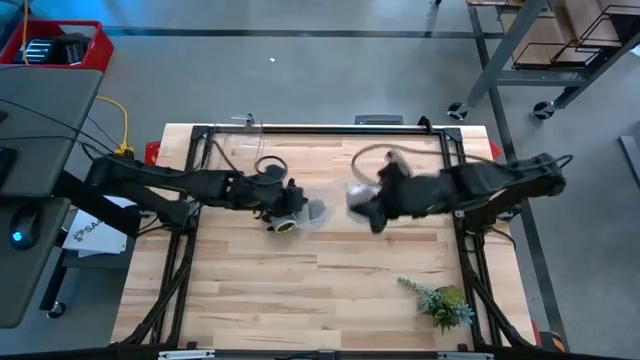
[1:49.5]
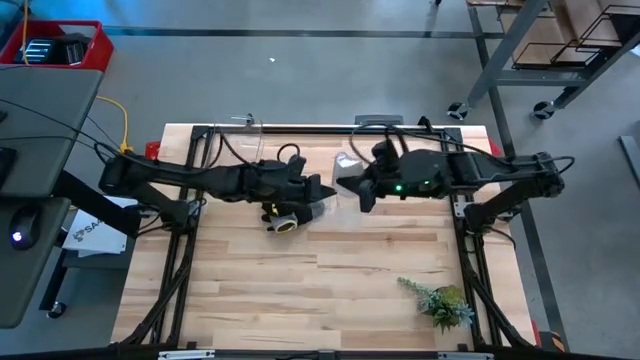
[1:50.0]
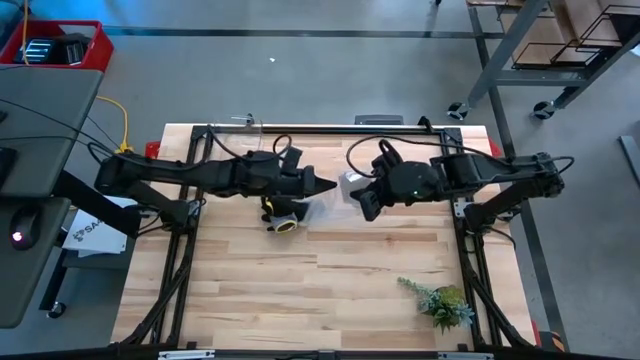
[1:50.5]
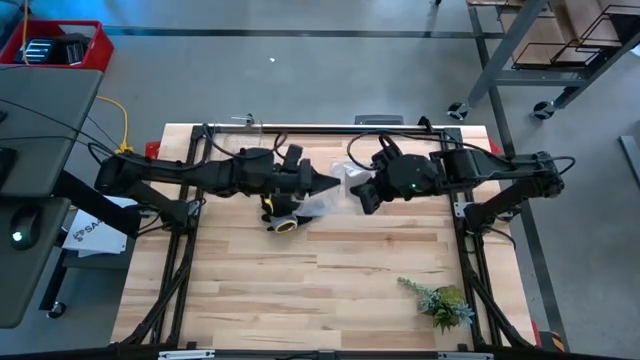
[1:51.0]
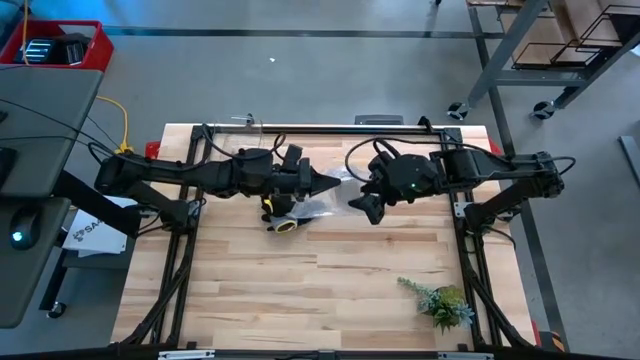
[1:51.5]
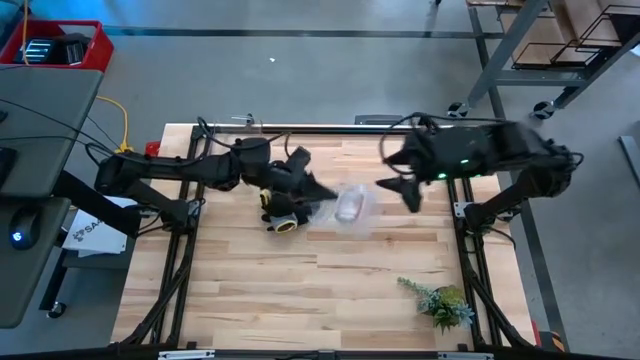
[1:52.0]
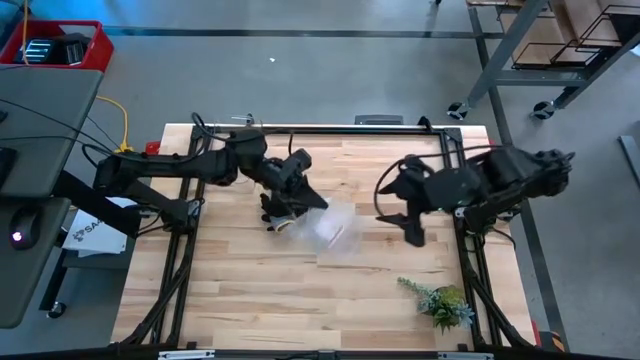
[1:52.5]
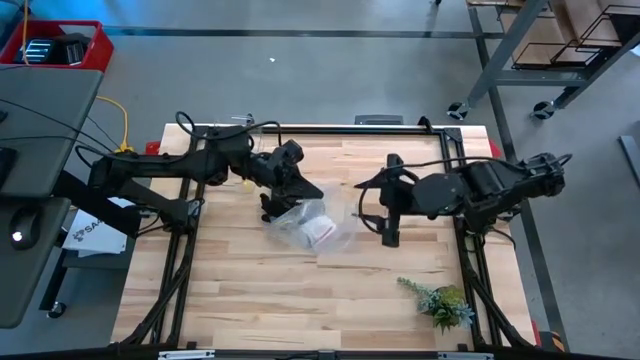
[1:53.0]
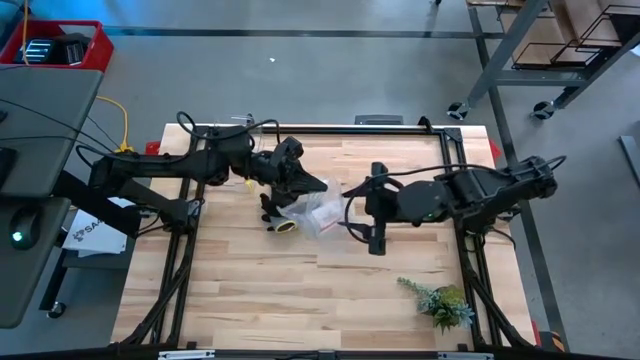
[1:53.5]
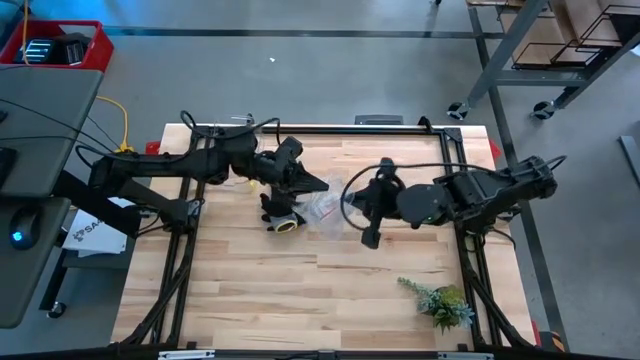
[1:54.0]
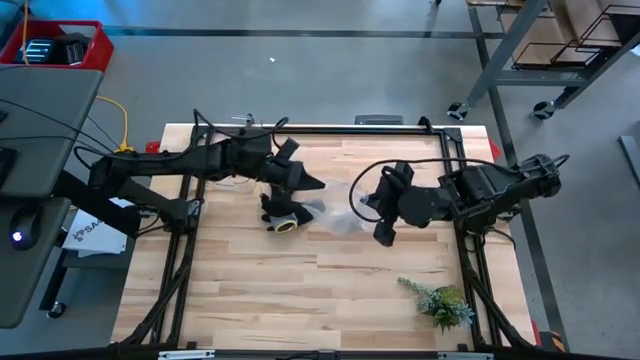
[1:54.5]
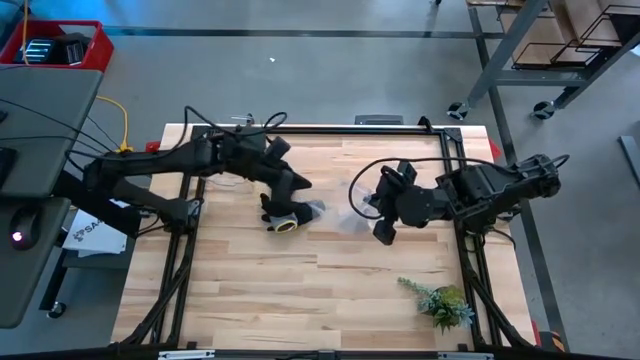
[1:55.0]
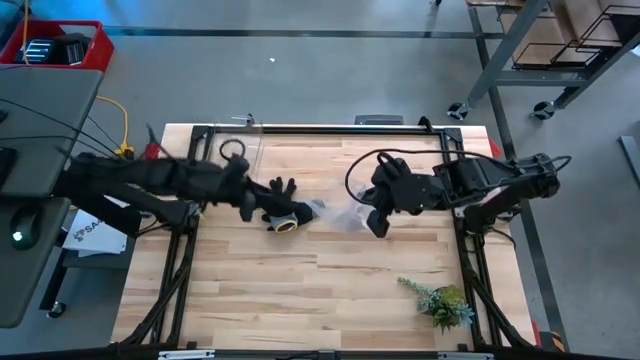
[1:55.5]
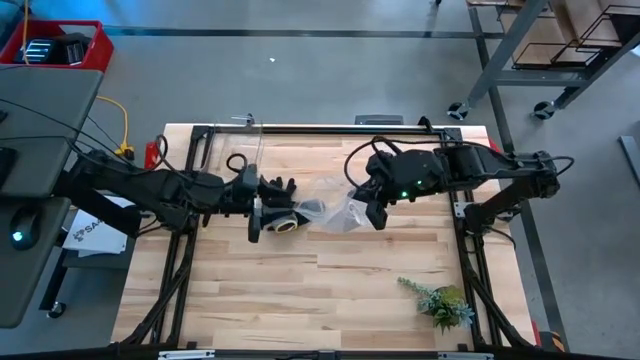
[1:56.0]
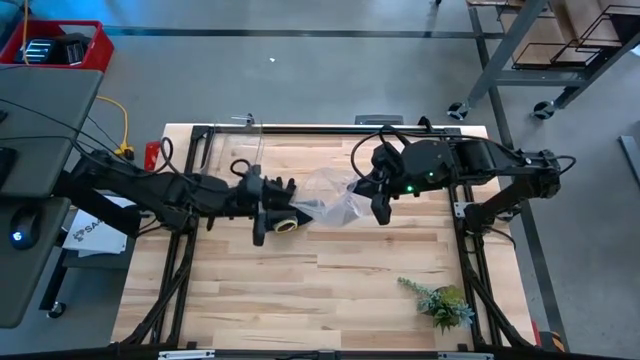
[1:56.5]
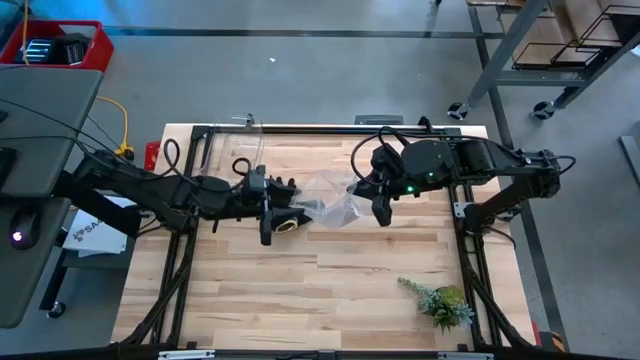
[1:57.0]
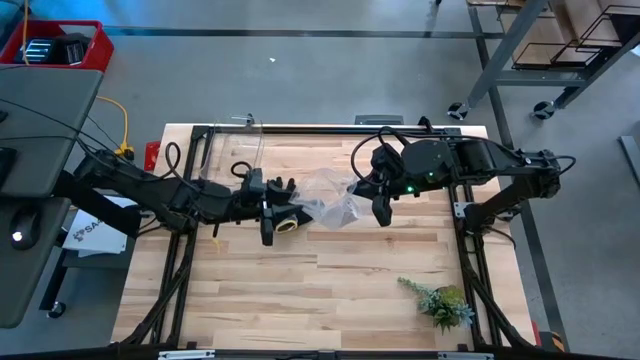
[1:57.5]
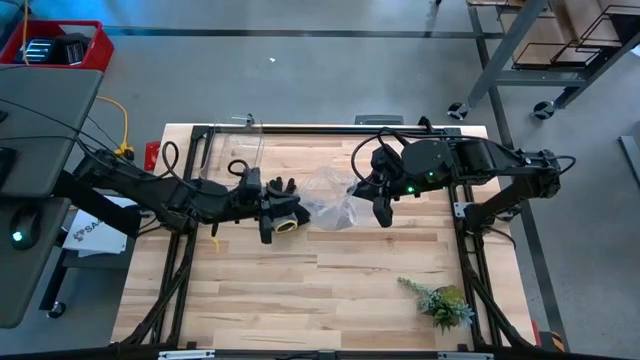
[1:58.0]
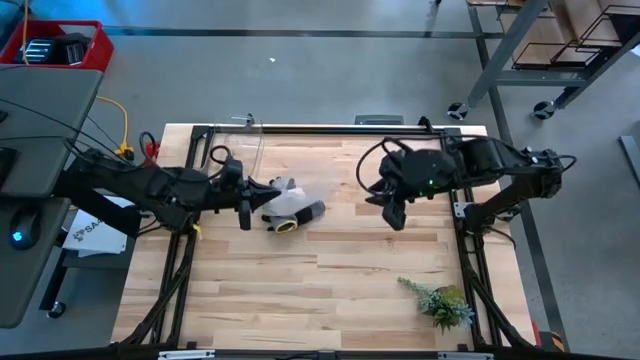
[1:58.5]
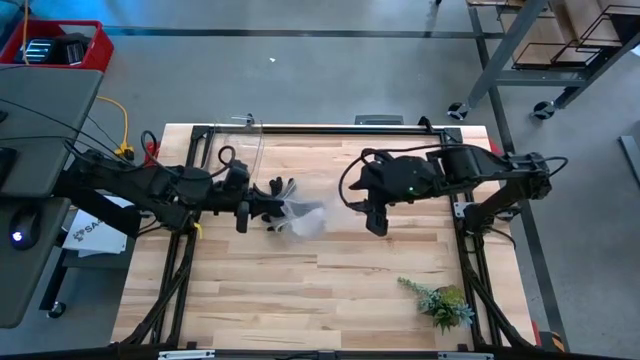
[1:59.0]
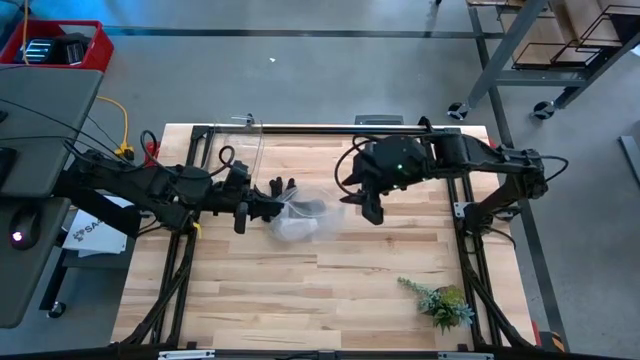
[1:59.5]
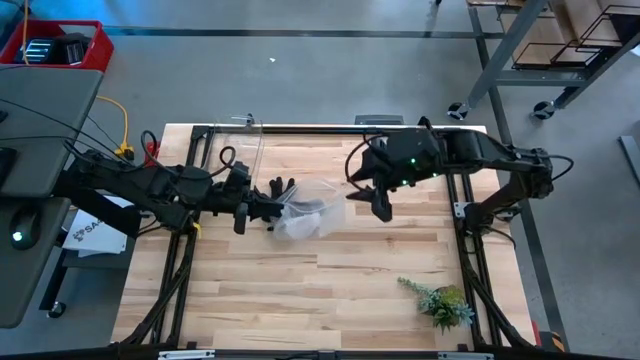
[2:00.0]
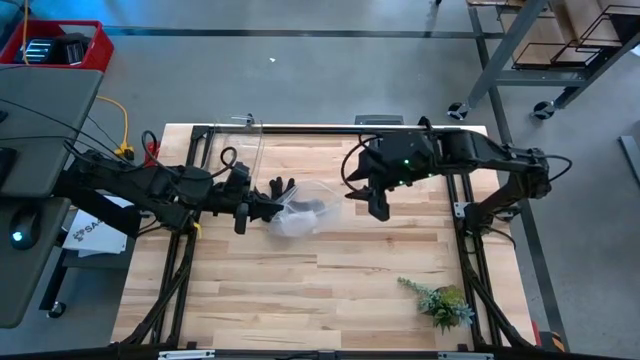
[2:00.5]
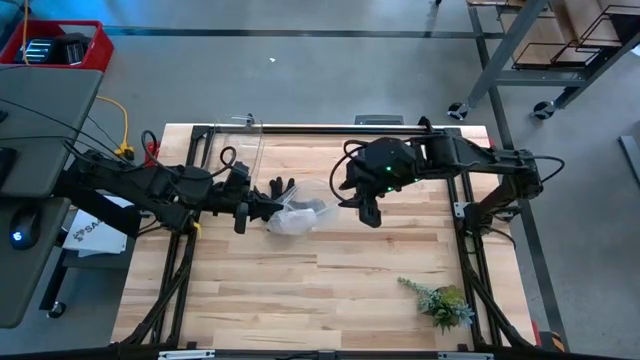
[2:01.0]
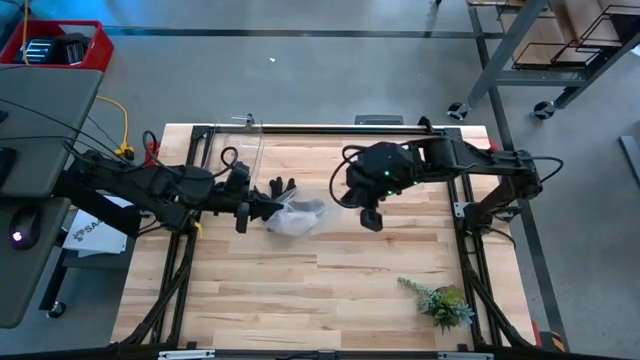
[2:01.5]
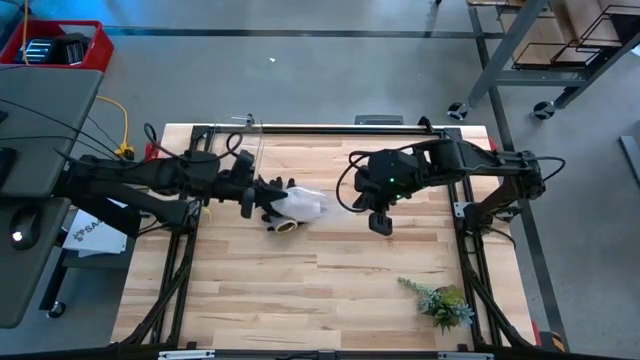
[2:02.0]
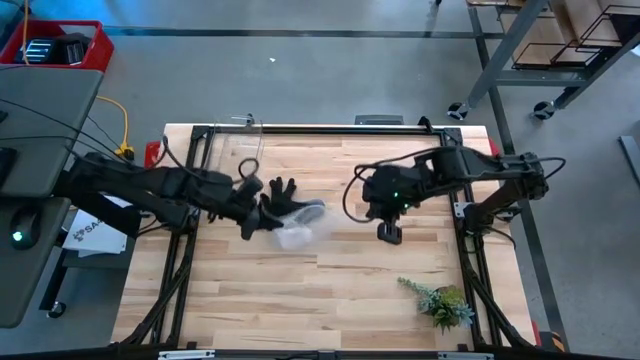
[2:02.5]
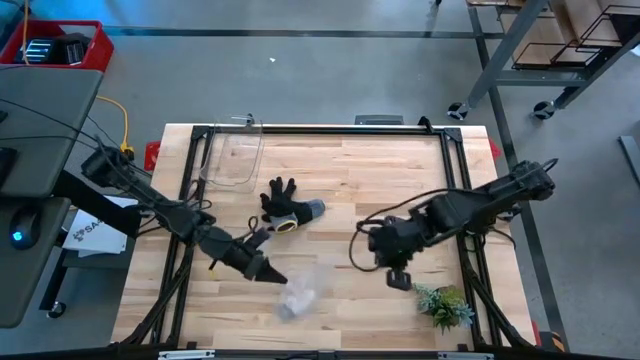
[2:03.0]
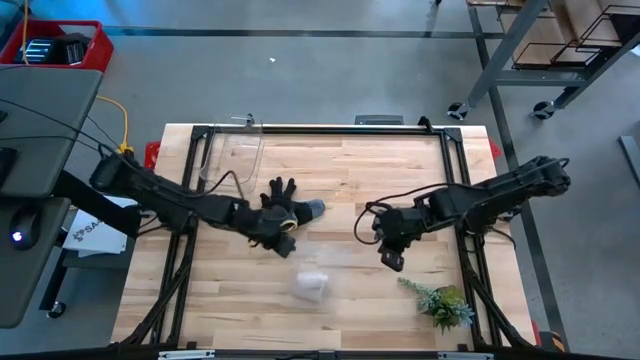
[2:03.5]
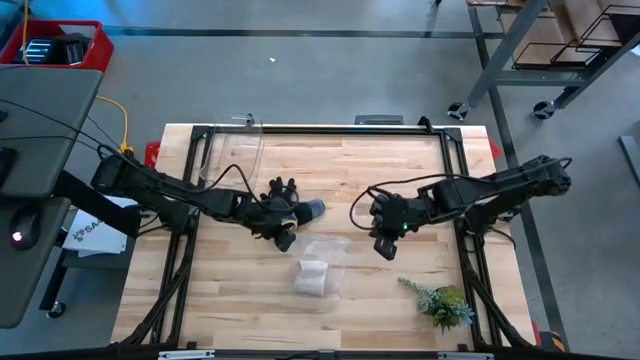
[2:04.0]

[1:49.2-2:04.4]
Task: Roll bandage
Put the white-brown bandage into the transparent zip bag

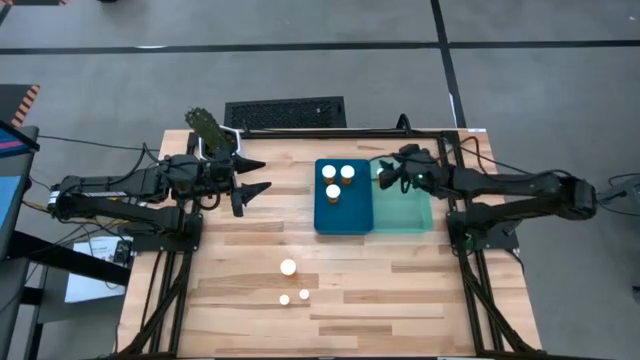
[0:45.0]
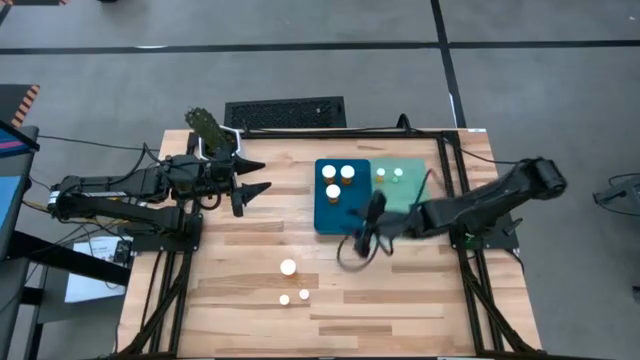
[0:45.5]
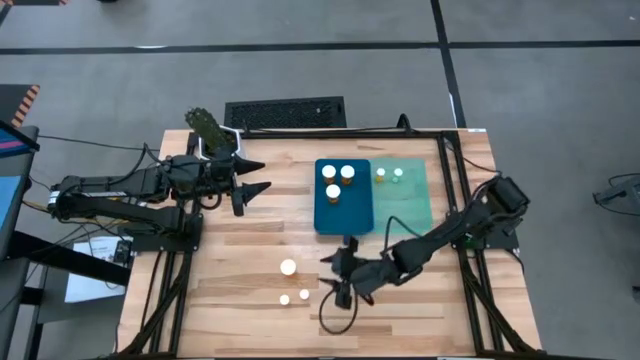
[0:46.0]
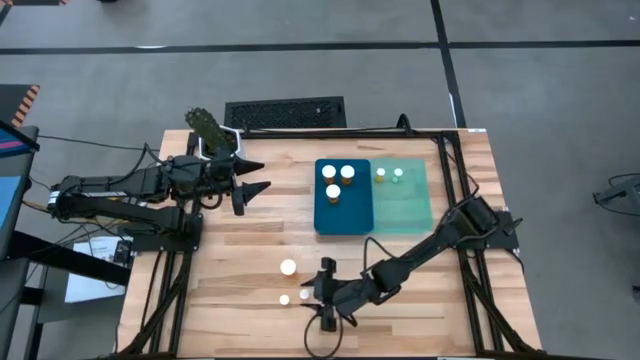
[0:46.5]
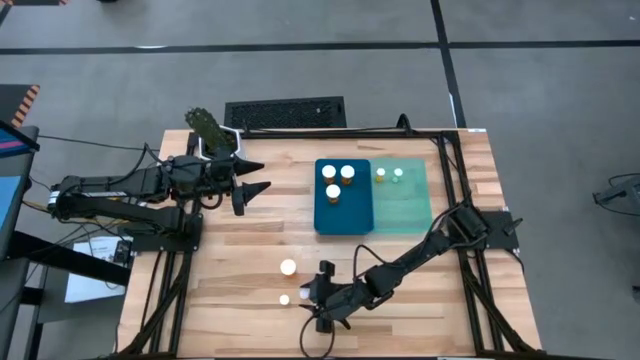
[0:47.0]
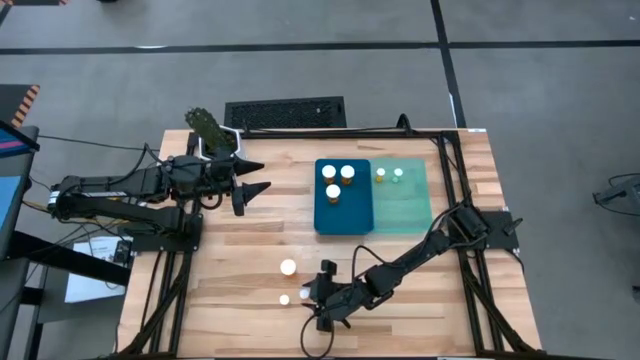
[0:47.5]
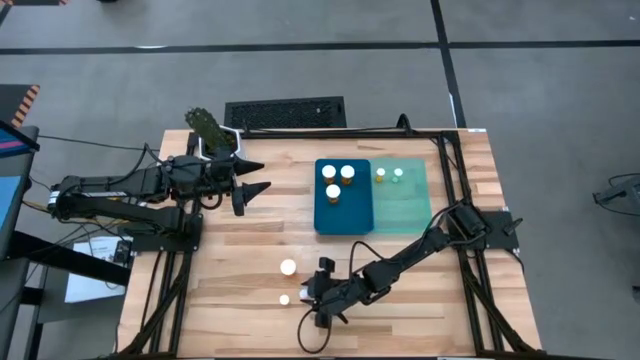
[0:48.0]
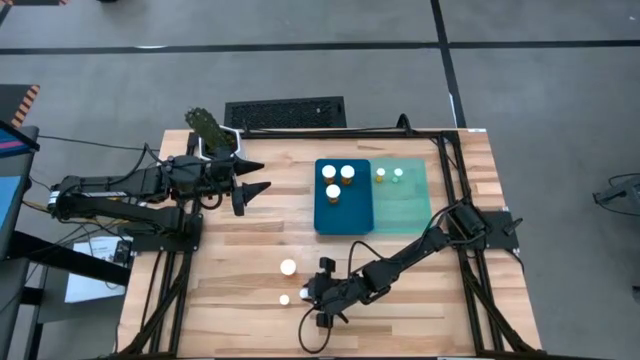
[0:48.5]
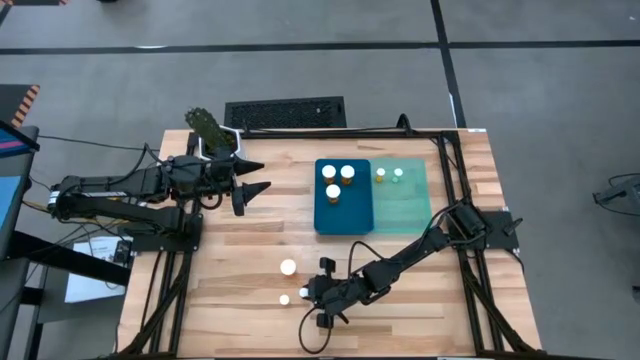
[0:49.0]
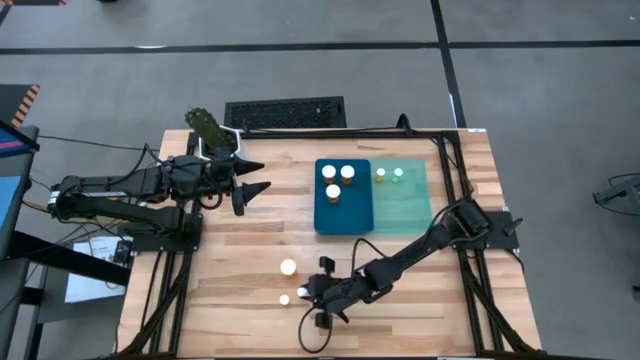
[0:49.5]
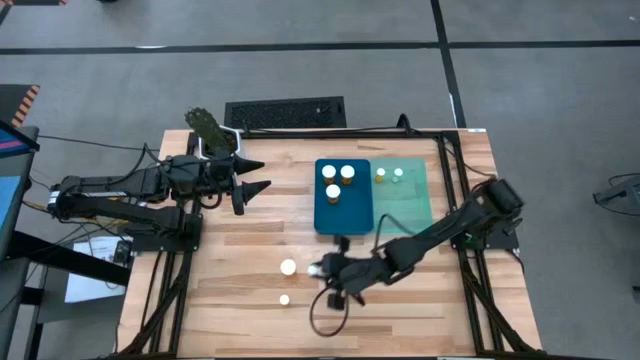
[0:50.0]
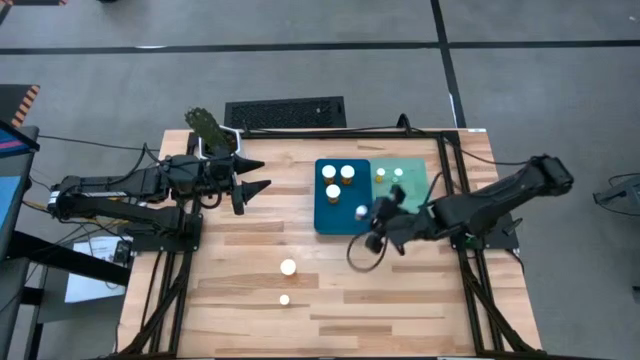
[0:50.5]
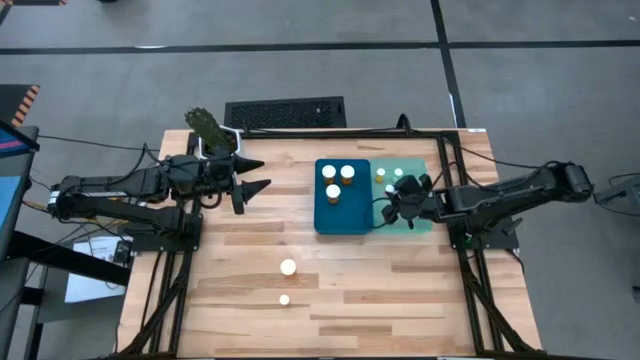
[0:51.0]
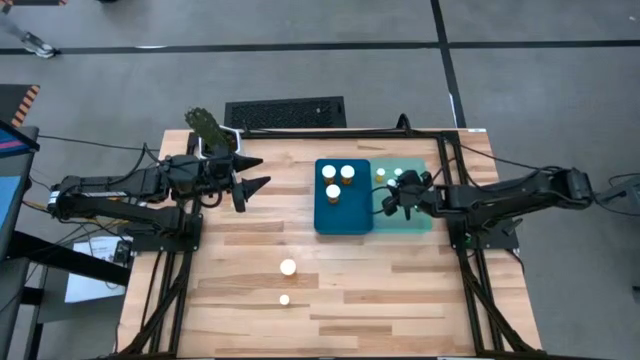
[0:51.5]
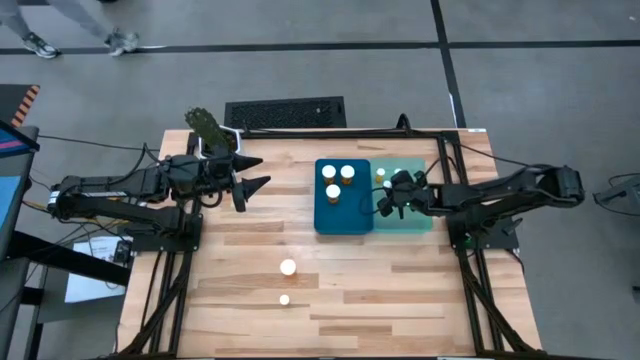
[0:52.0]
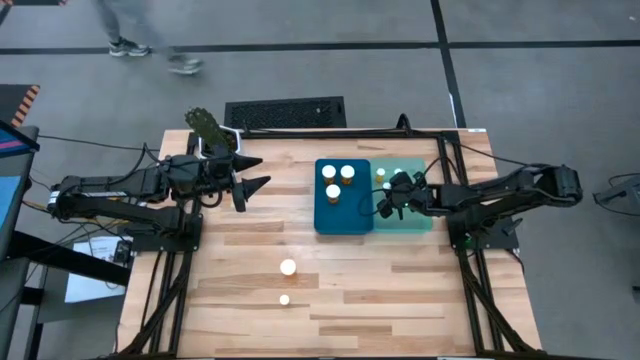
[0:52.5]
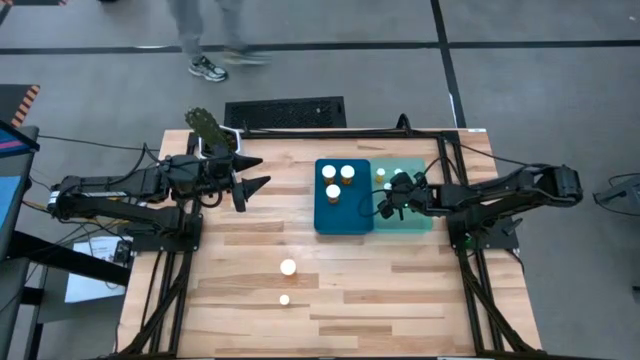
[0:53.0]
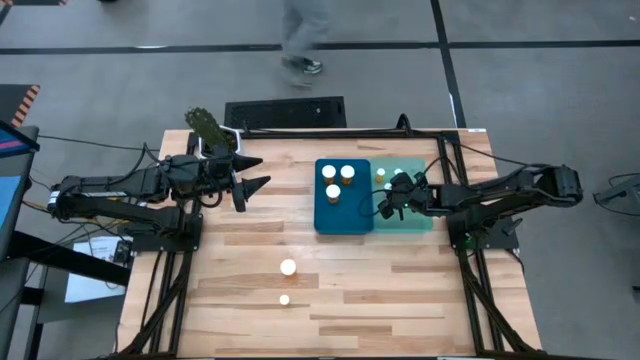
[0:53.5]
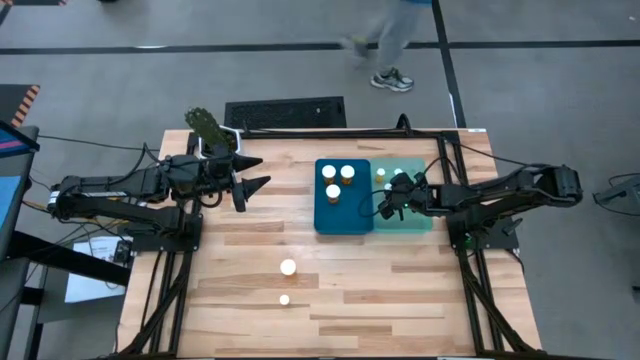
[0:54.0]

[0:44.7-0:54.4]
Task: Pick and place medicine bottles into bin by pill shape (circle, oval)
Put the small pink pill bottle into the green bin
